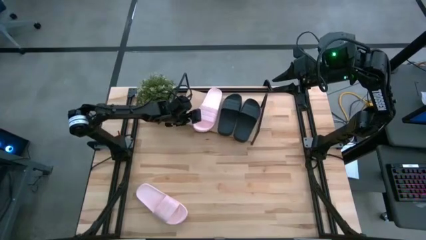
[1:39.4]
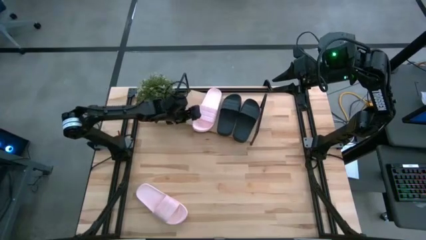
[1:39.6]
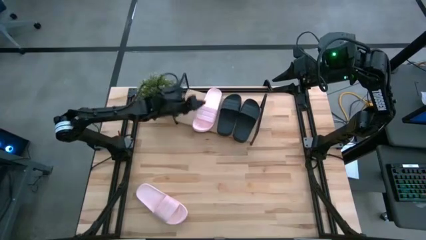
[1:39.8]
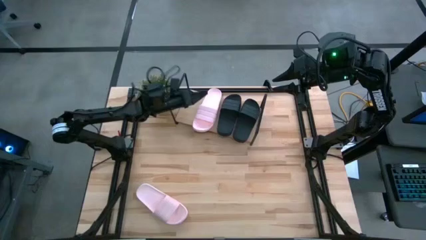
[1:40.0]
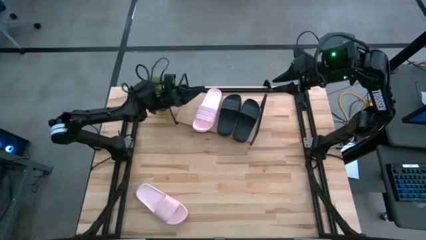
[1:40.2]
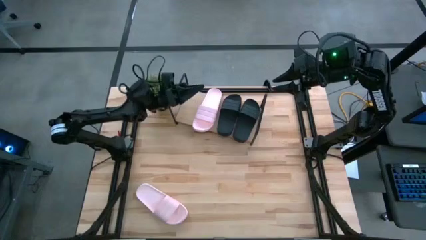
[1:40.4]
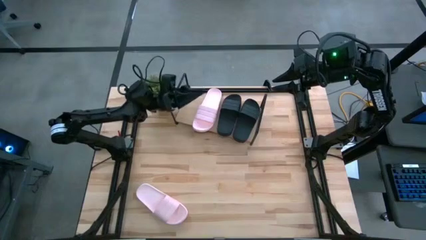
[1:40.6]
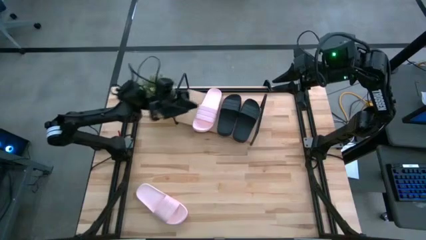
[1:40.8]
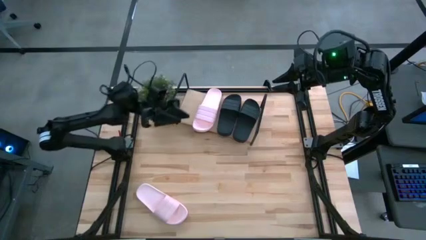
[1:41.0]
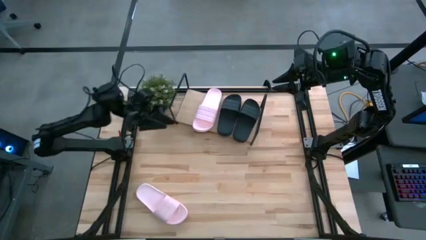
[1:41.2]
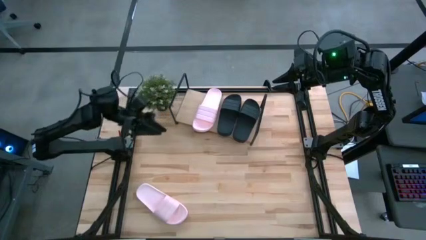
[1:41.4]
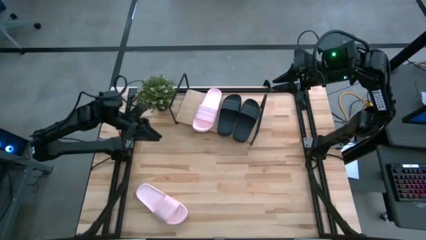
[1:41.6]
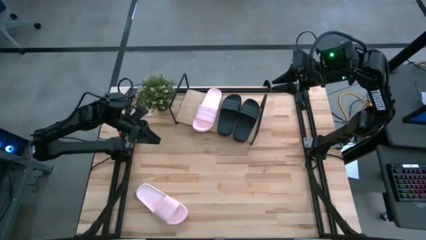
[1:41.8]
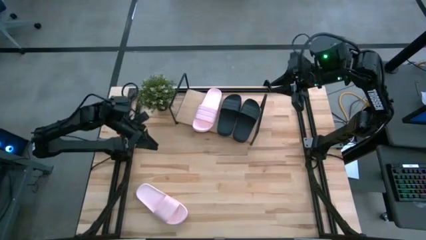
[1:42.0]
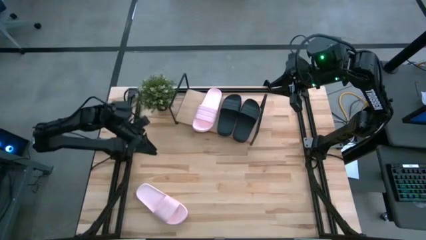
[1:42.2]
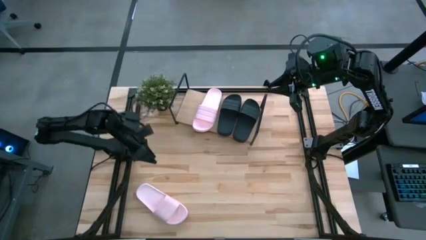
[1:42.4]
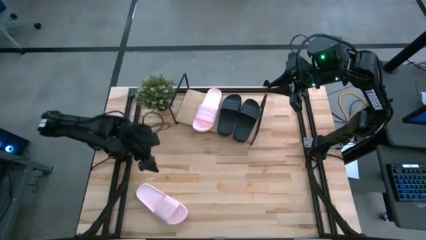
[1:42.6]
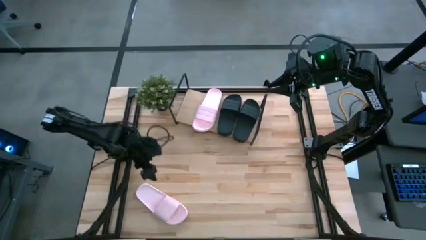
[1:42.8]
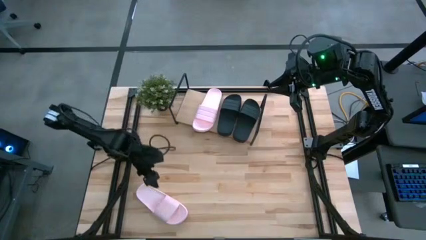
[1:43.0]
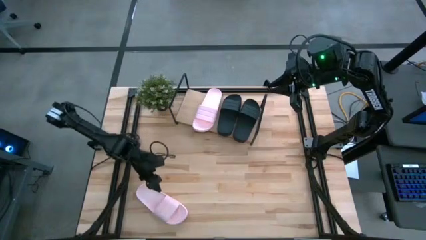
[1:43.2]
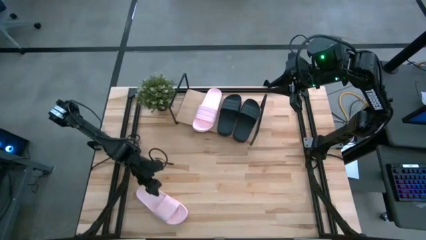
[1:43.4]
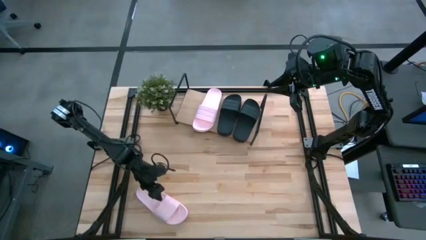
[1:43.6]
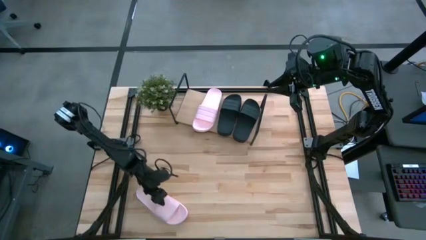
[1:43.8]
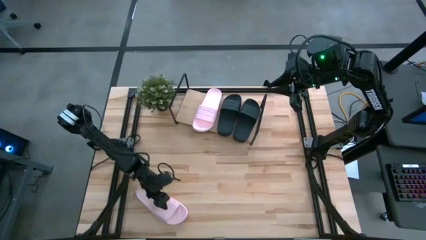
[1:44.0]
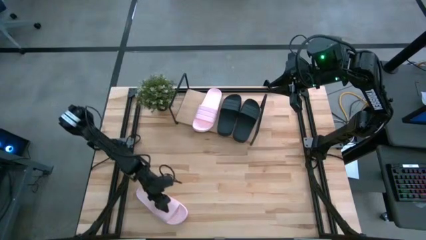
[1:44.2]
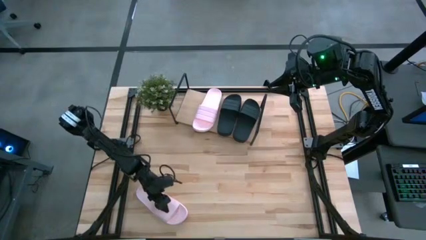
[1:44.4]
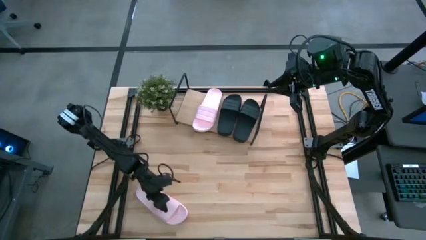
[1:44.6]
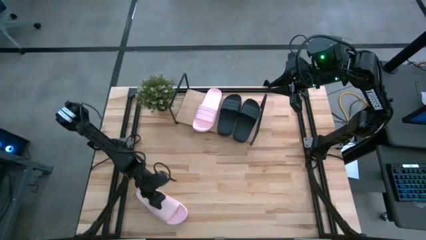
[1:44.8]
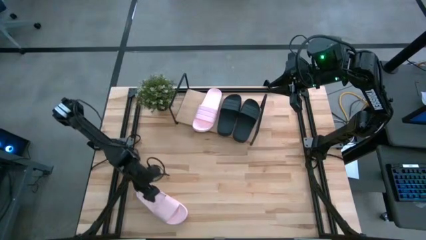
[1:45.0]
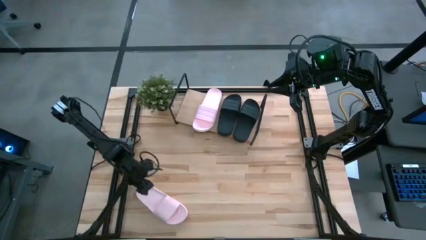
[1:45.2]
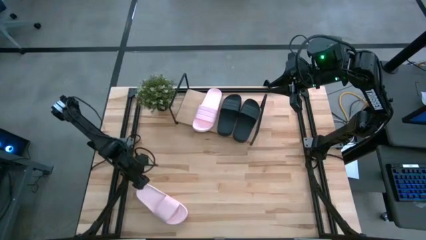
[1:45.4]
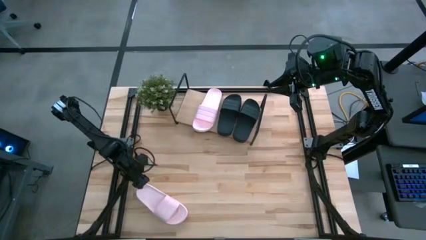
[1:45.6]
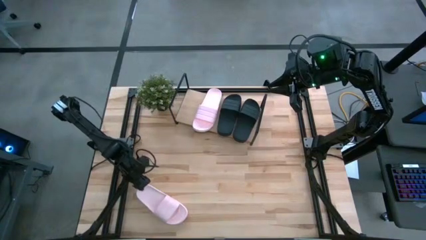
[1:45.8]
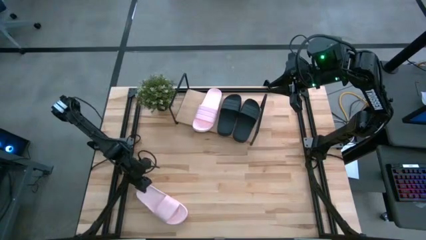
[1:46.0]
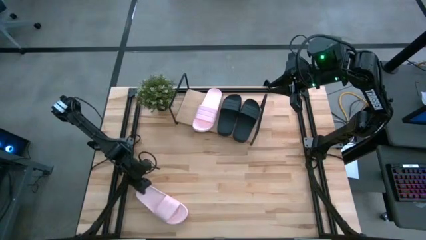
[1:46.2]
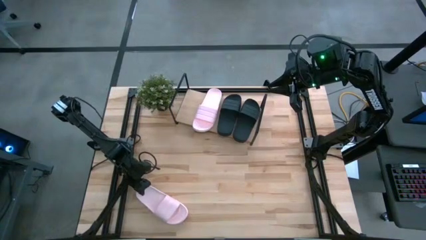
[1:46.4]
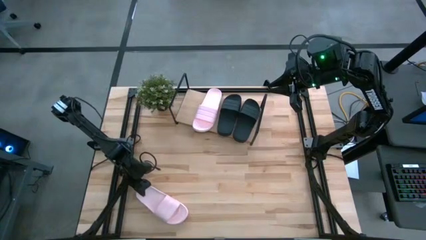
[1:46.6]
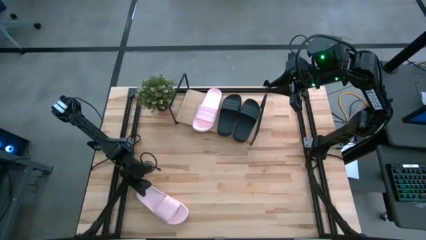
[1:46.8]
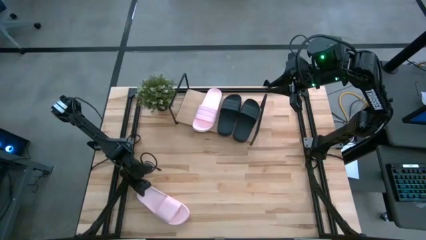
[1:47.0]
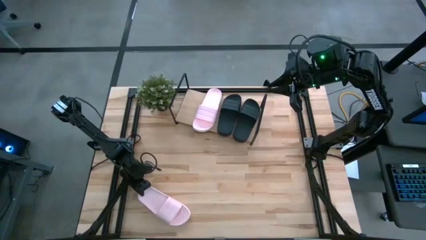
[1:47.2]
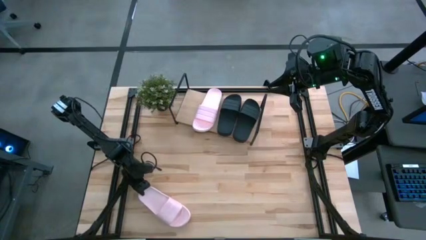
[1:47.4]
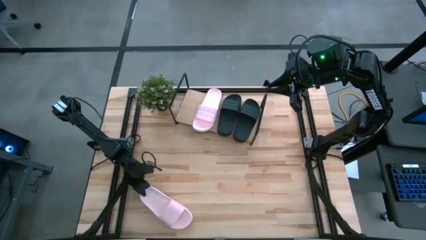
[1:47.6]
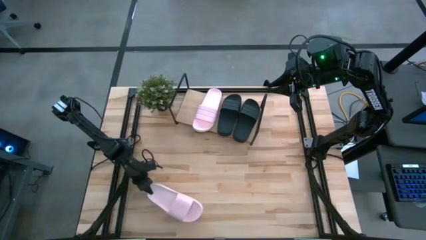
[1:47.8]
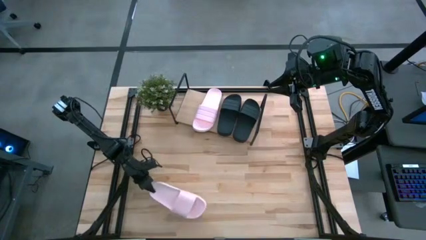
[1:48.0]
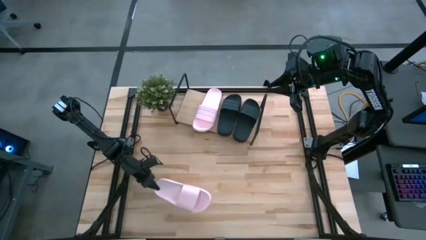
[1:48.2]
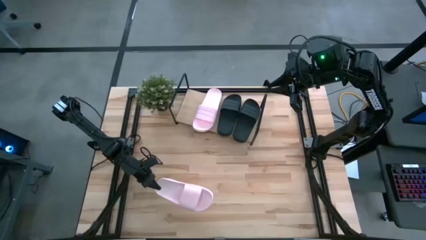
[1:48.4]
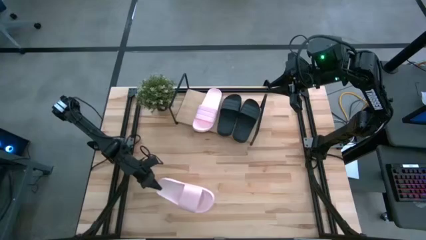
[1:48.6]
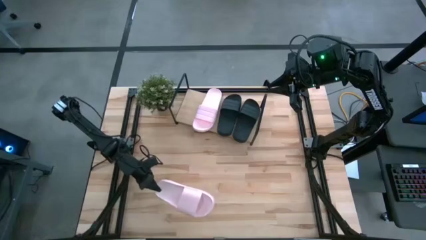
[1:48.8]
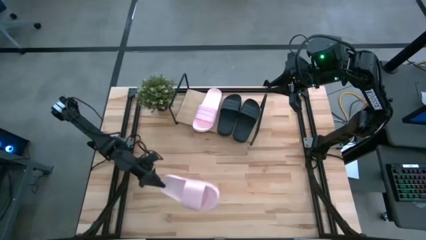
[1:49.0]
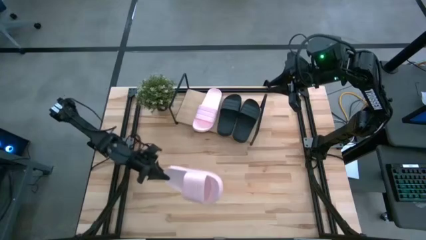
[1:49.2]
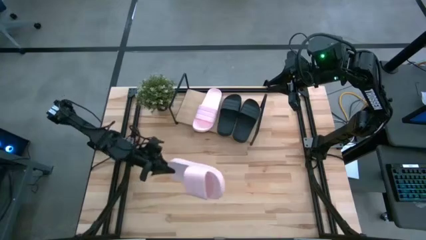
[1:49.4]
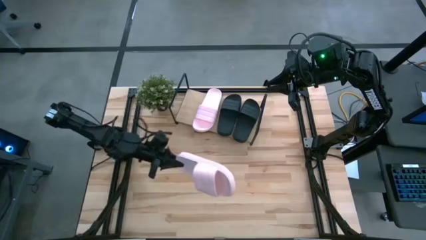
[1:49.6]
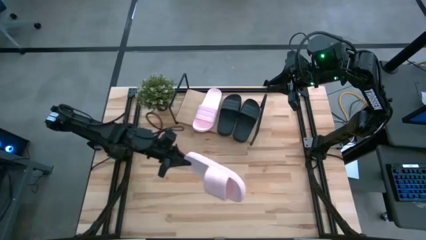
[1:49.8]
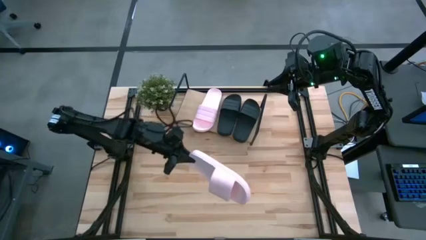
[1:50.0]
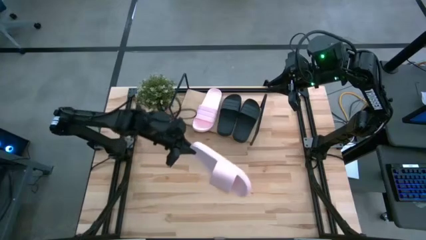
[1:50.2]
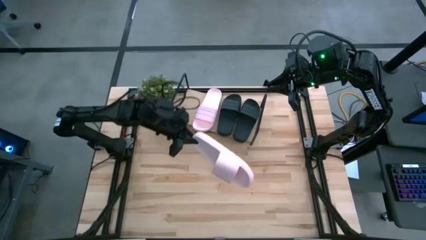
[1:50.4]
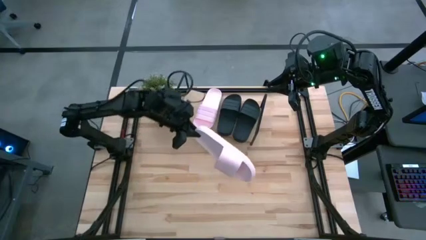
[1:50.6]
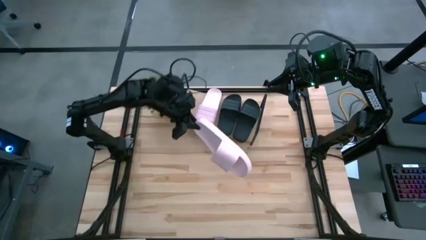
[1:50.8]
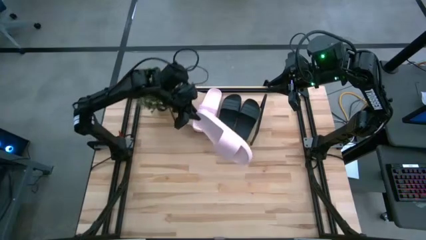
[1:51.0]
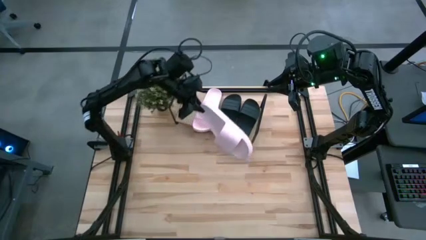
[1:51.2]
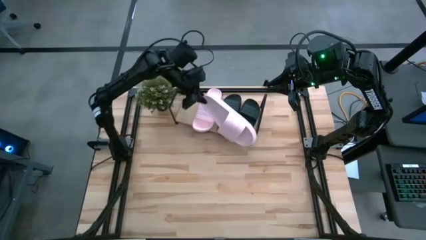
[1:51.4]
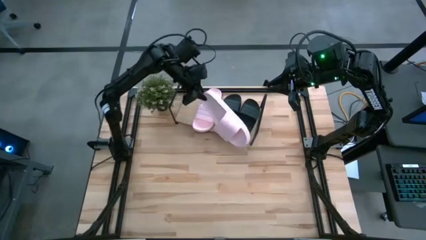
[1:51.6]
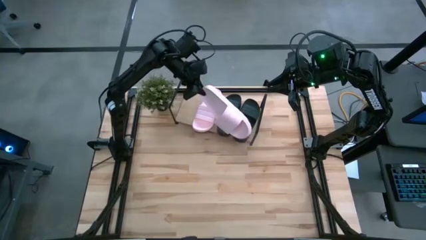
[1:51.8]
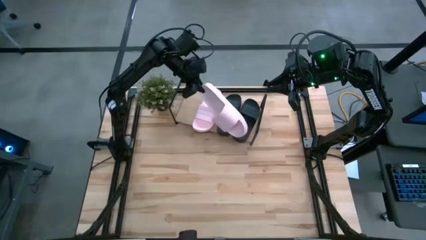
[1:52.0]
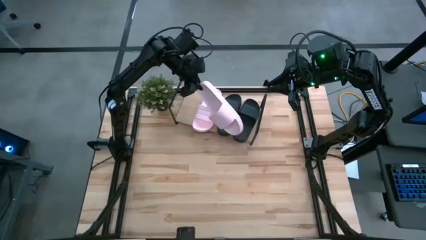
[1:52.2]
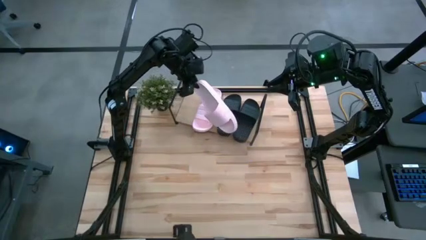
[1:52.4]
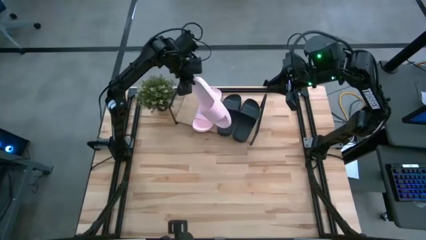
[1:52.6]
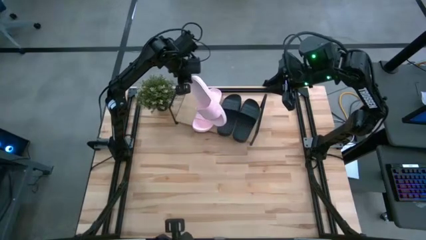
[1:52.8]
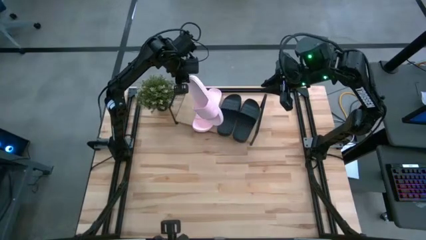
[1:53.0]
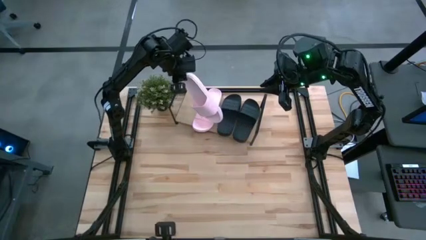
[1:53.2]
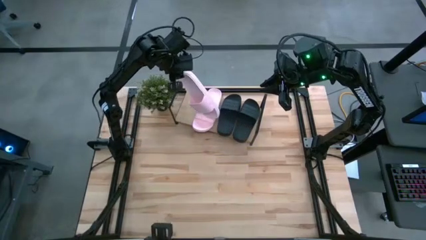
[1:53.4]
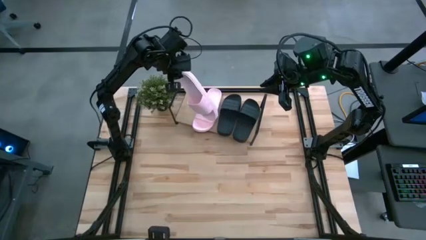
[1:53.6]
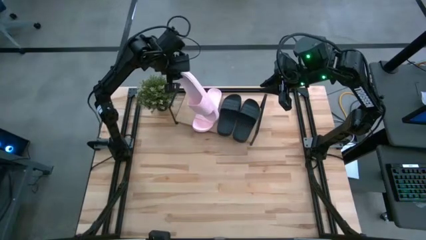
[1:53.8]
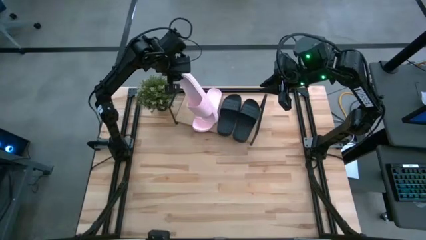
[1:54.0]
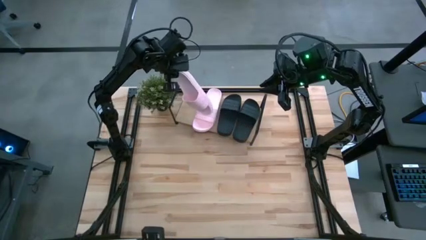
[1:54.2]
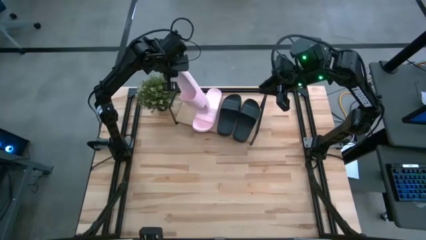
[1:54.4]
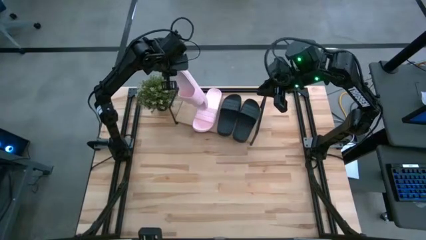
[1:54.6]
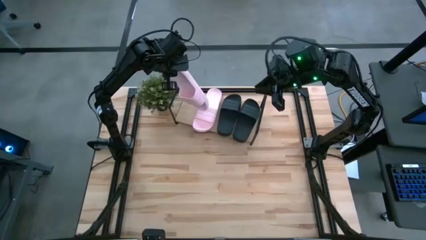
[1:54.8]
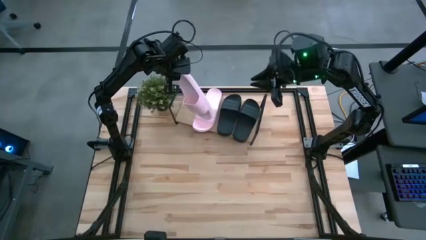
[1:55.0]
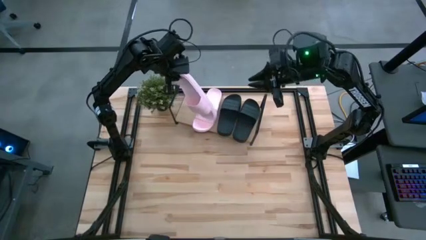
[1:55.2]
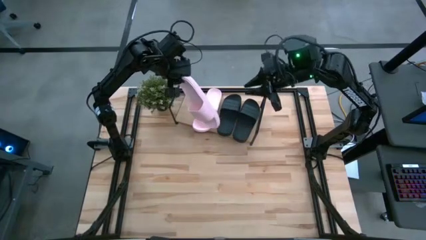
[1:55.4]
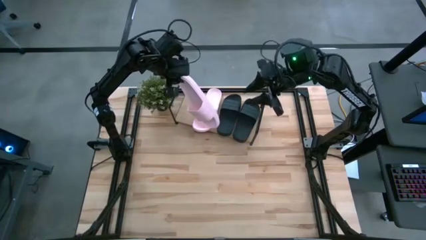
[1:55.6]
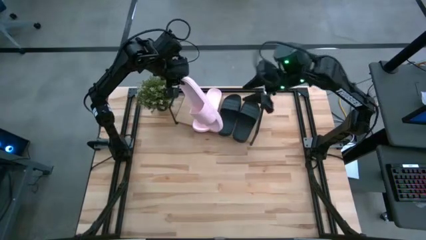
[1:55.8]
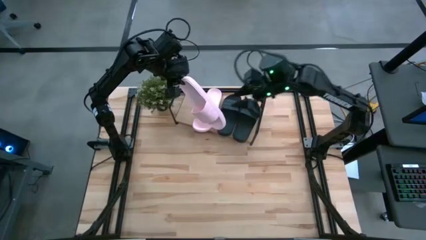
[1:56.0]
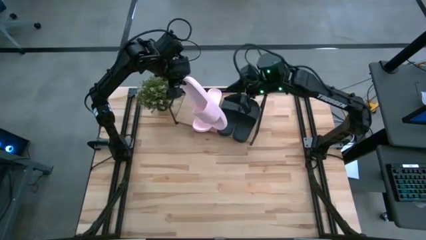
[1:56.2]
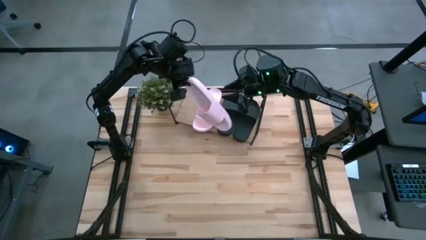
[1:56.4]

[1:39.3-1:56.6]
Task: Pick and place slides into the shelf
Put the pink slipper on the shelf
